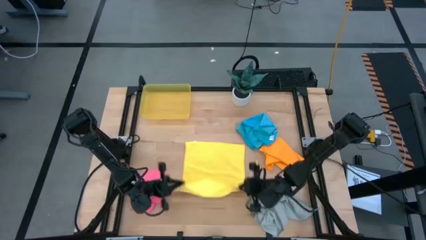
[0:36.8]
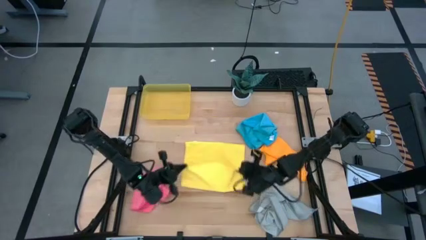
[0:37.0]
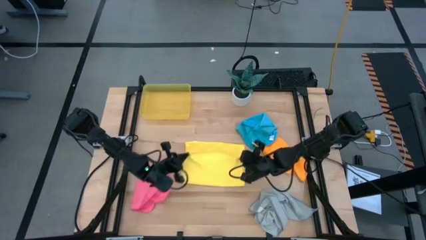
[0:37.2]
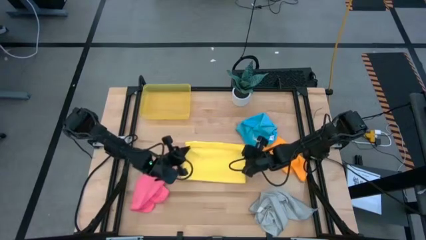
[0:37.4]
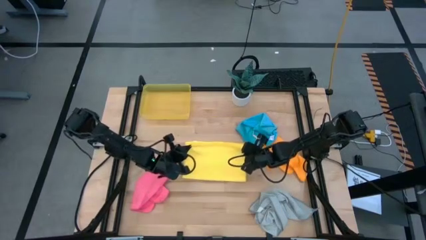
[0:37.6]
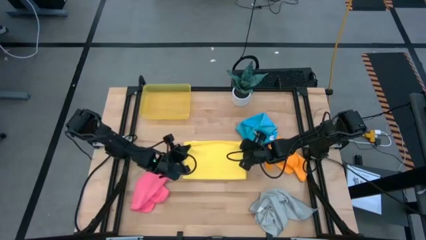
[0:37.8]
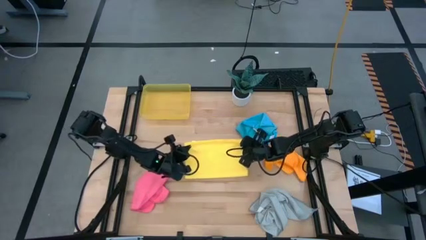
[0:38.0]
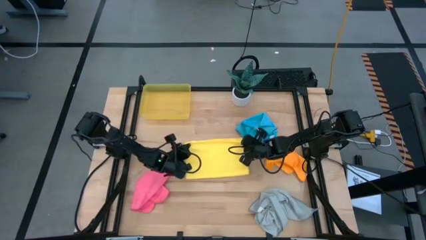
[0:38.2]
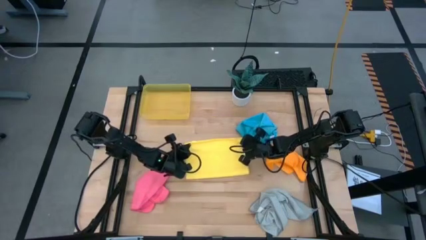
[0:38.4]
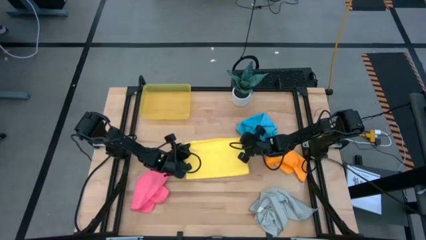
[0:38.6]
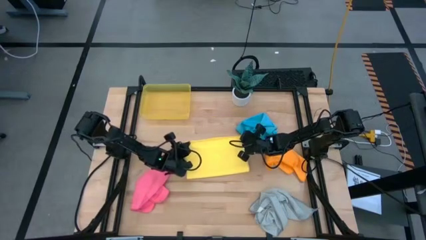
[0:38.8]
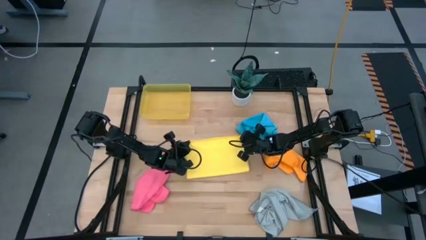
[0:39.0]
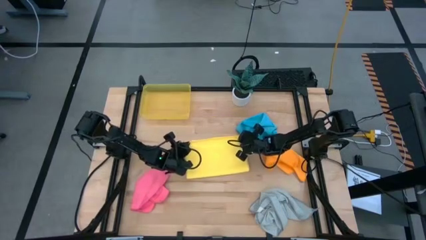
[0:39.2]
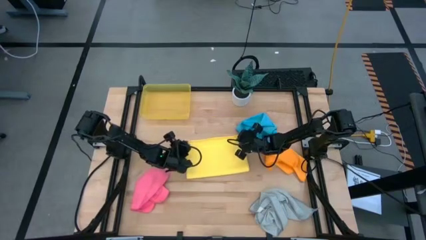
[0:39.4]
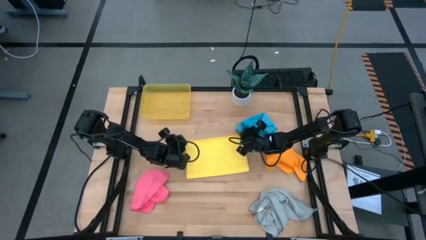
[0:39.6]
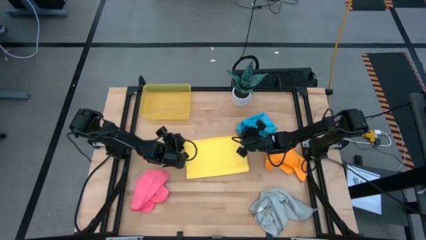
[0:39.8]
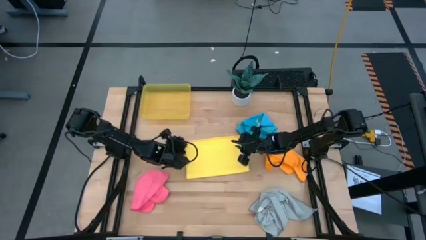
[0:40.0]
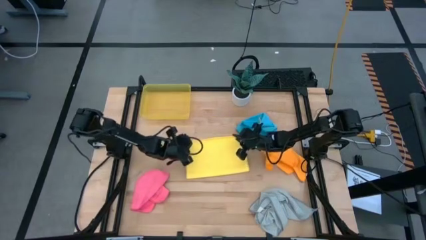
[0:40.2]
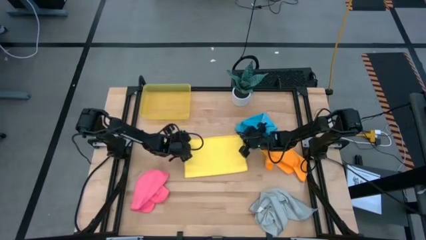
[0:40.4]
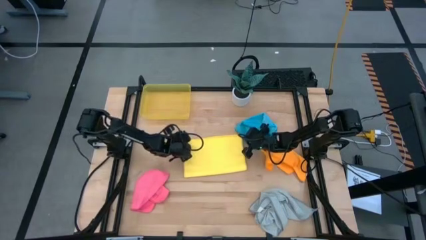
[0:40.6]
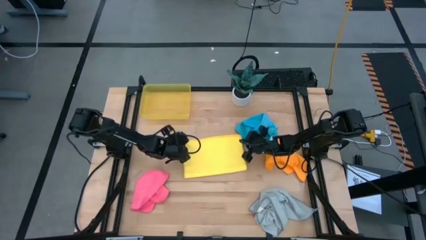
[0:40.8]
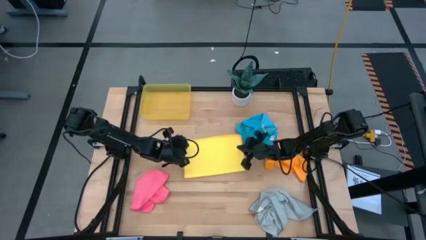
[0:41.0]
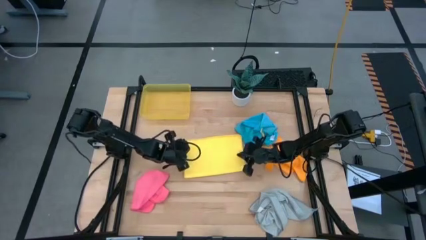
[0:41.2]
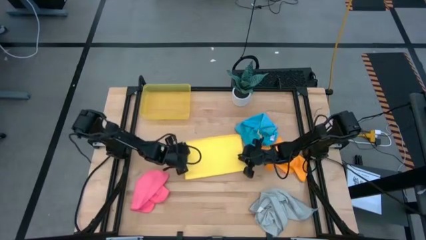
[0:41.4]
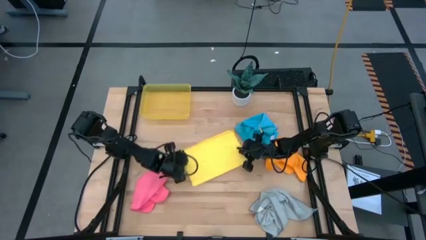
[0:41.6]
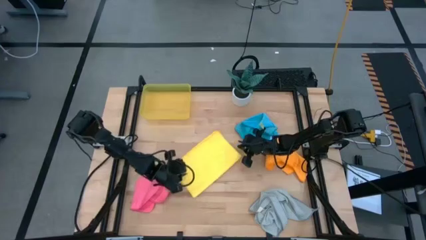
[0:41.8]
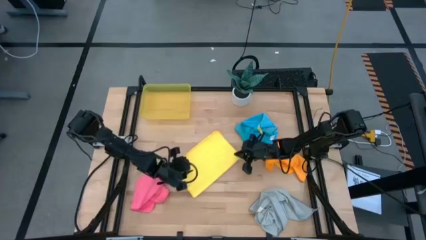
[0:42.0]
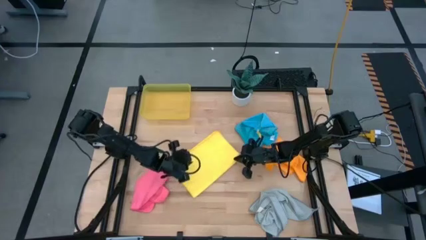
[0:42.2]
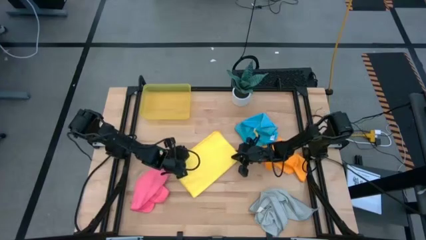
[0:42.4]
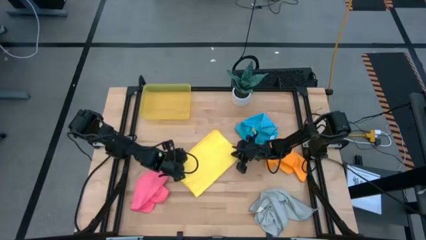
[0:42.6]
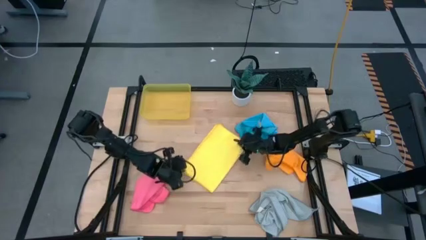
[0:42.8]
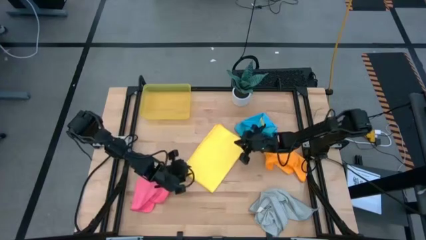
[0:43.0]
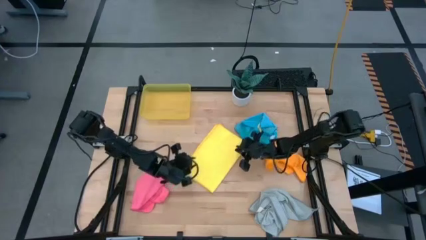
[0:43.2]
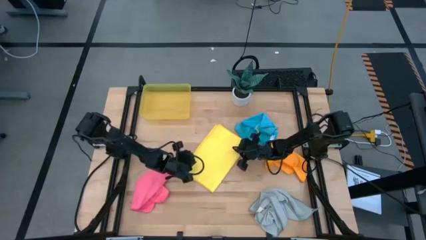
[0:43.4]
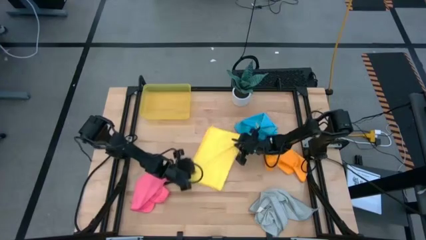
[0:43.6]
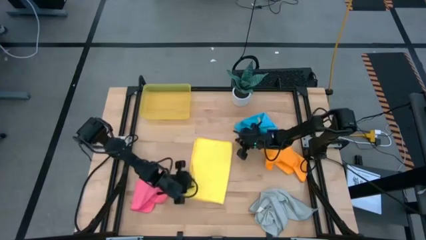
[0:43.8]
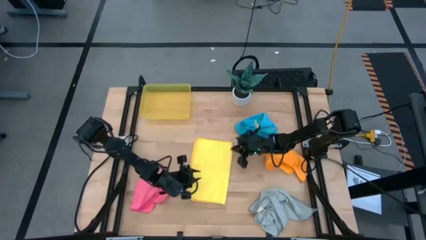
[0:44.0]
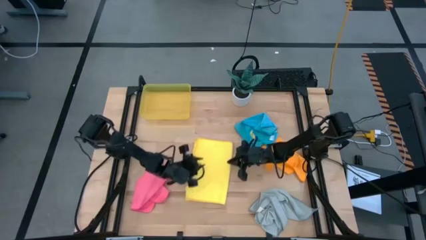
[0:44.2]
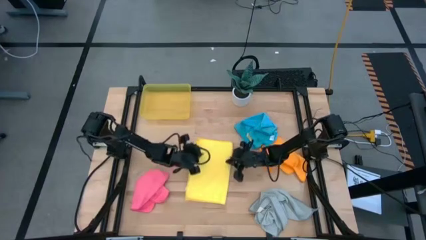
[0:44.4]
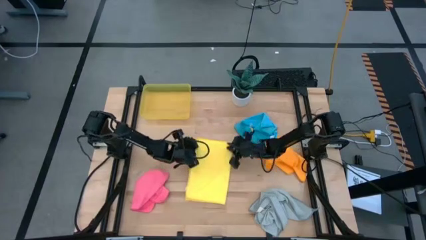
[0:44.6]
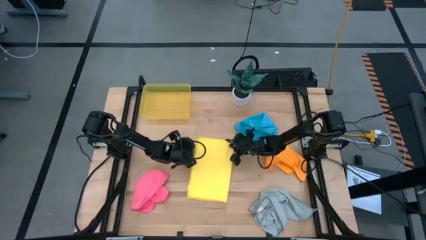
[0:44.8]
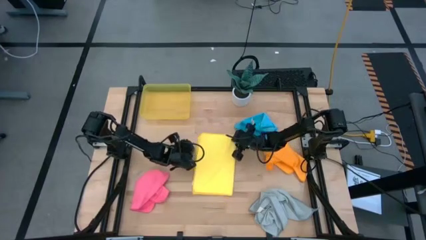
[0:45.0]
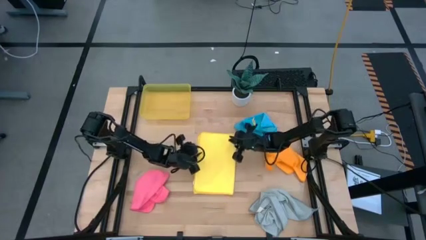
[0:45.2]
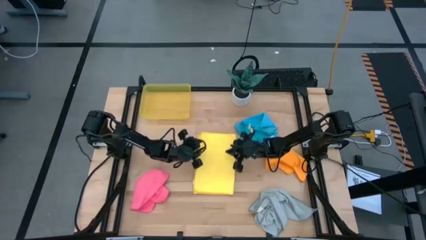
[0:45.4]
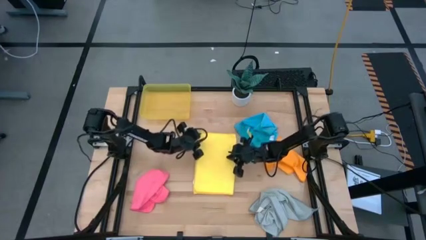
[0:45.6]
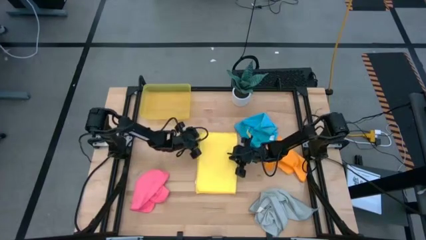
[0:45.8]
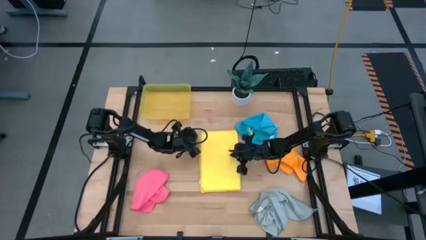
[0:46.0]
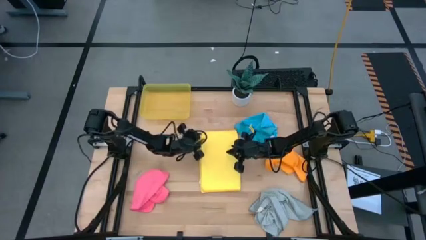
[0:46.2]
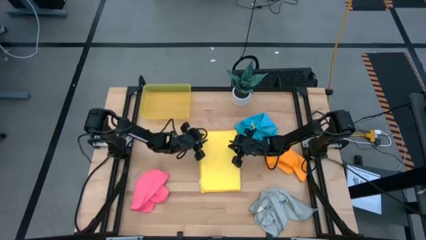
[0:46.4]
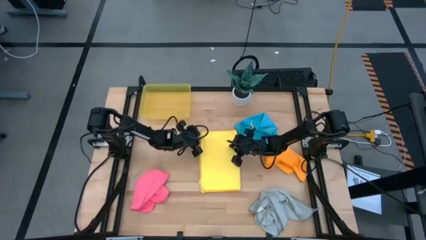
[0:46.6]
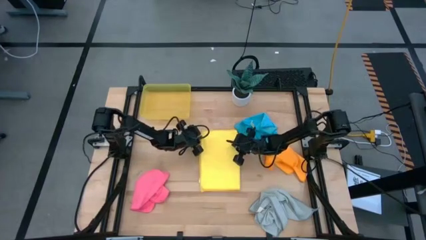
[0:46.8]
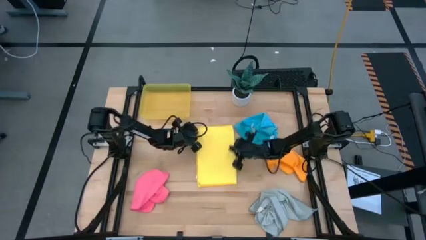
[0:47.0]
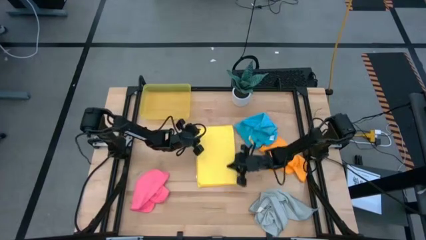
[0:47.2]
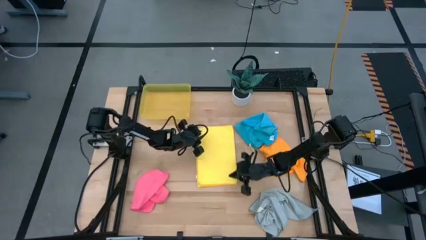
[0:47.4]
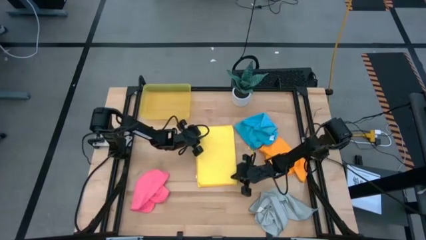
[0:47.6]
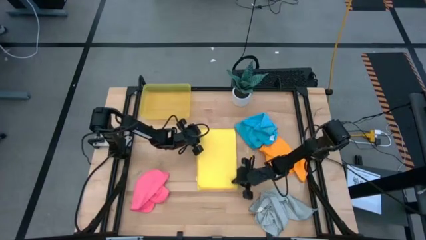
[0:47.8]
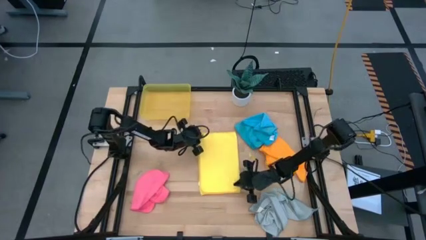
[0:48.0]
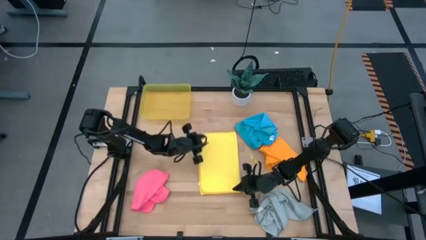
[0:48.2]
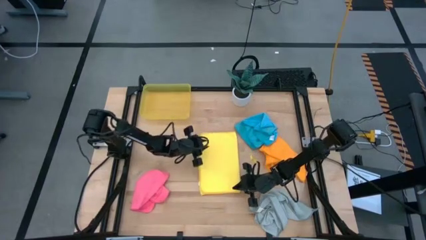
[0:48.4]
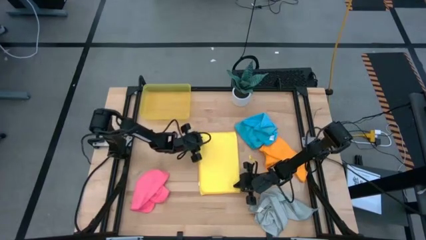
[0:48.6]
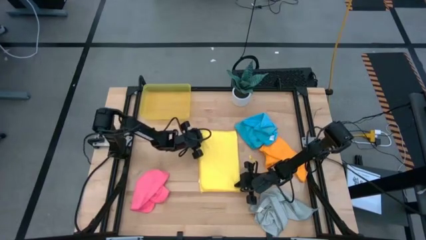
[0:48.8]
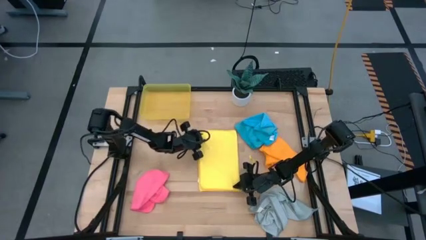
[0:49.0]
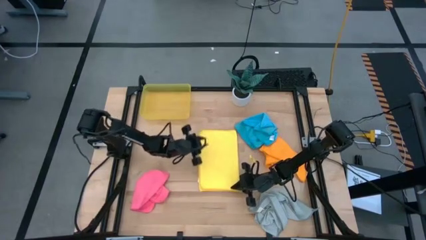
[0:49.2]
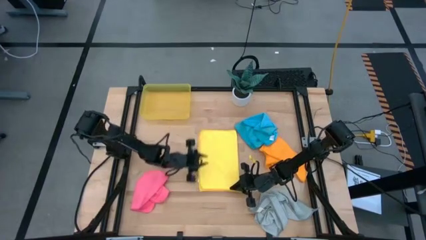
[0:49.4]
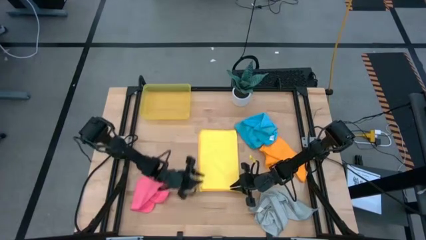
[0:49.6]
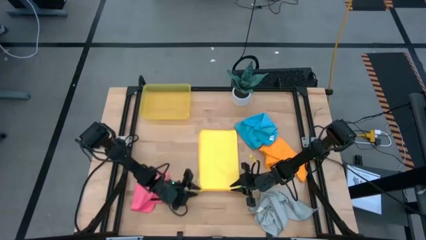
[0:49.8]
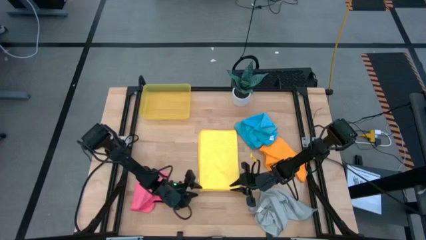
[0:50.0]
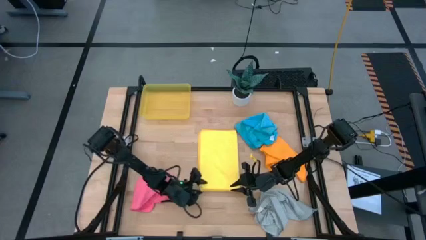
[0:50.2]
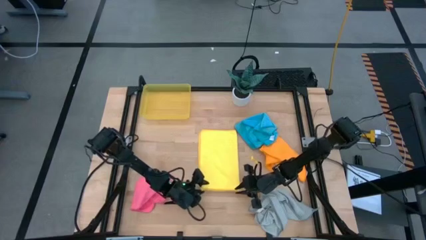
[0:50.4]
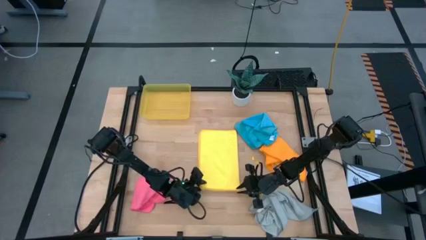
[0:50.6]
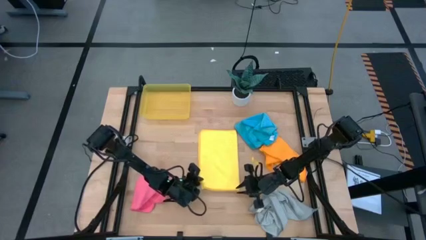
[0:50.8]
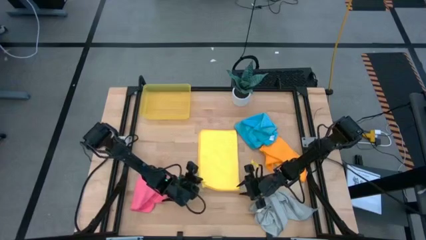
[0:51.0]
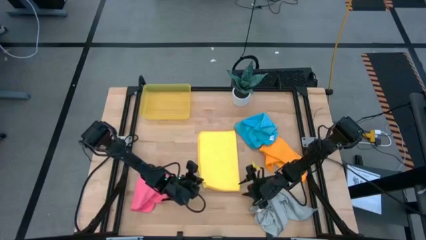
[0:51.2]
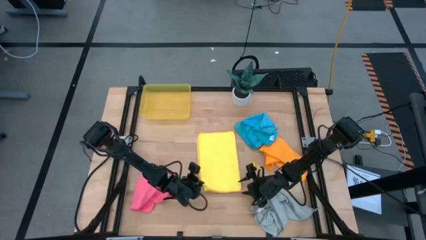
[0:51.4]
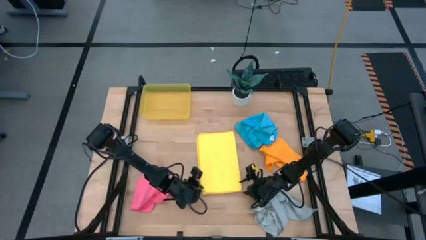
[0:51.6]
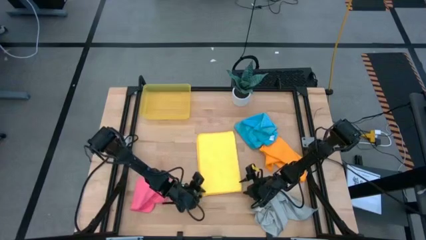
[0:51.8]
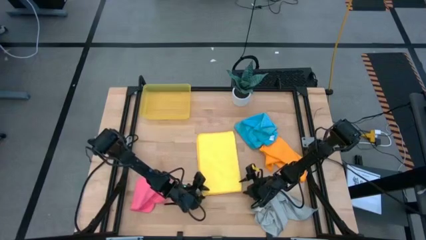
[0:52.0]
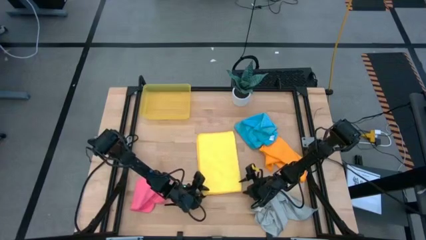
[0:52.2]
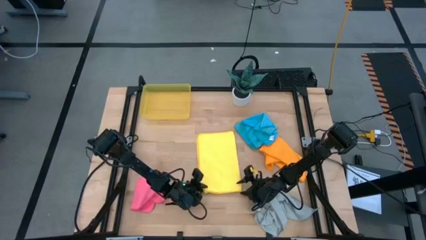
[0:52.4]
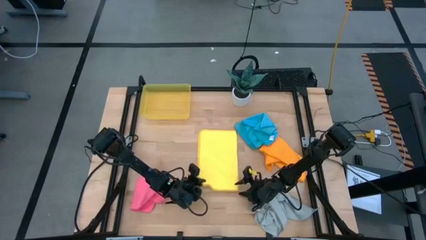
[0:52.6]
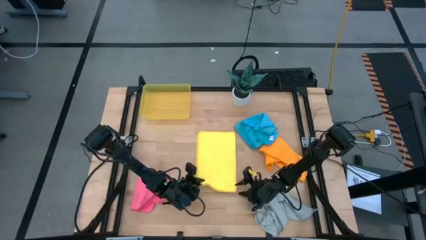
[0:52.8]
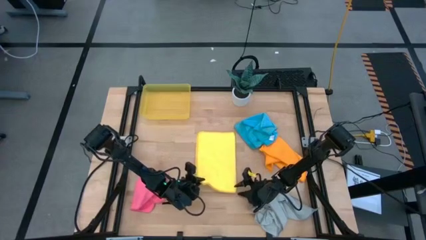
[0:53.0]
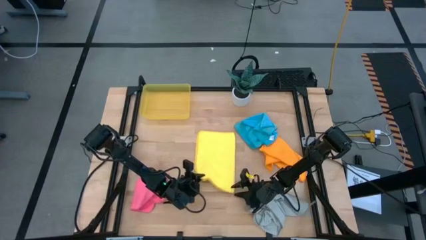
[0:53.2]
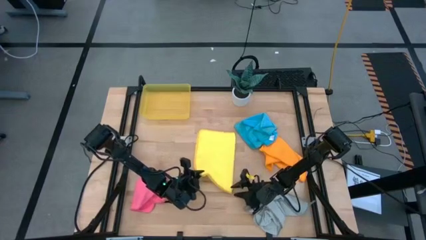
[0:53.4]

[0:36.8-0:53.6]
Task: Fold microfiber towels
Fold the yellow microfiber cloth
